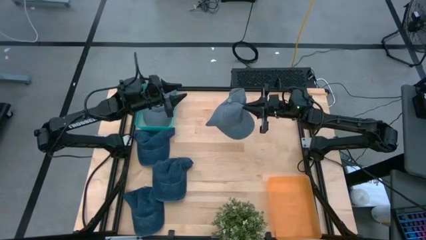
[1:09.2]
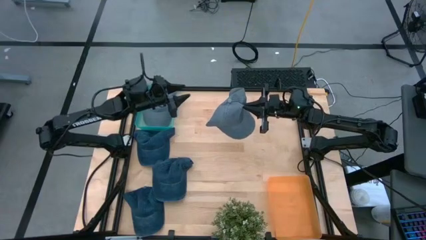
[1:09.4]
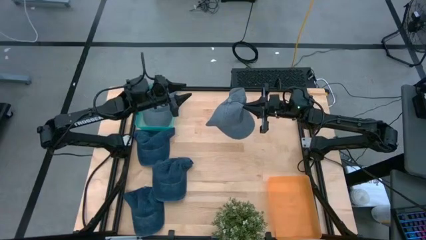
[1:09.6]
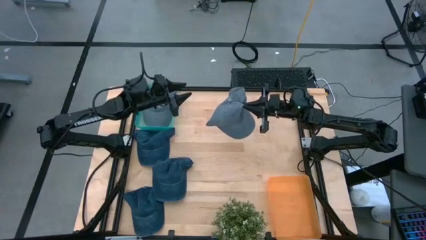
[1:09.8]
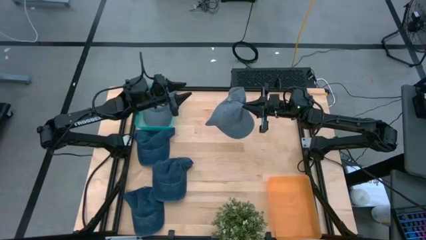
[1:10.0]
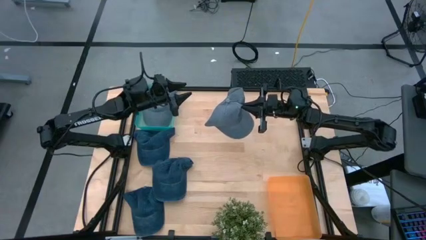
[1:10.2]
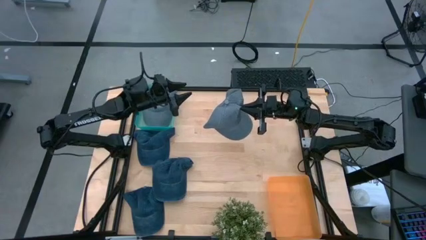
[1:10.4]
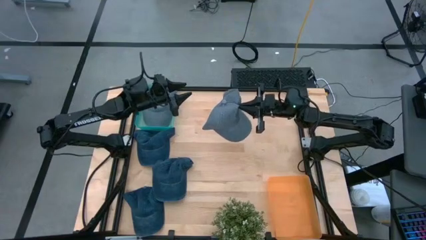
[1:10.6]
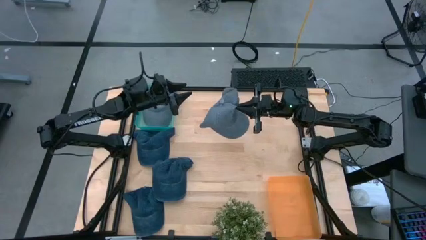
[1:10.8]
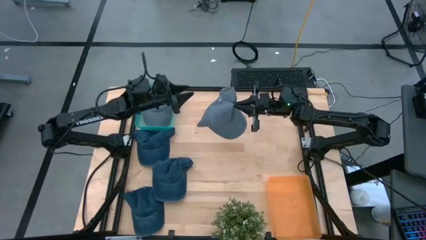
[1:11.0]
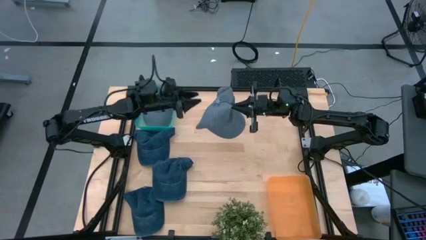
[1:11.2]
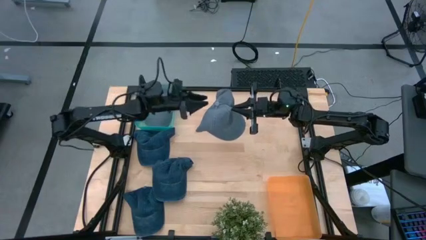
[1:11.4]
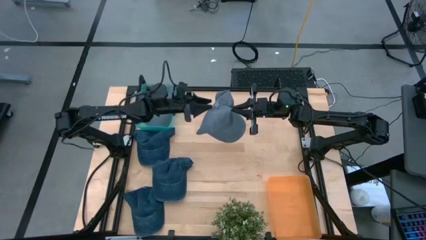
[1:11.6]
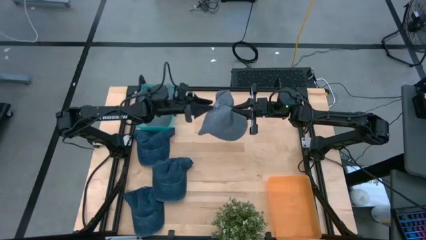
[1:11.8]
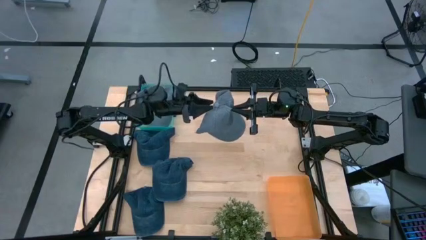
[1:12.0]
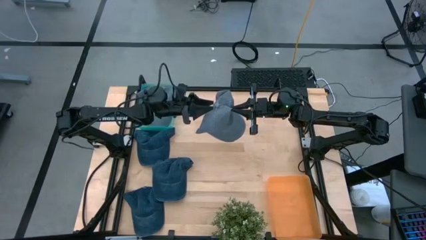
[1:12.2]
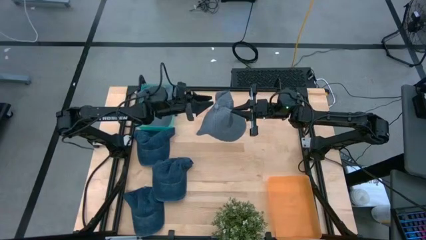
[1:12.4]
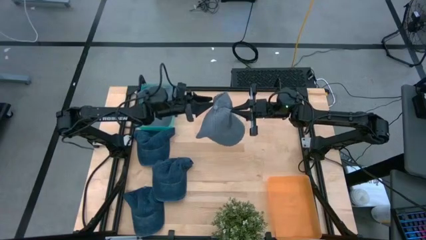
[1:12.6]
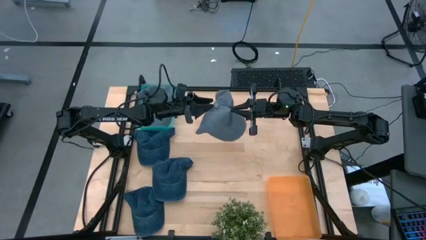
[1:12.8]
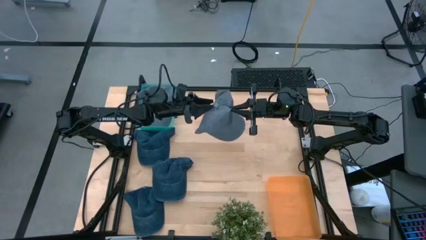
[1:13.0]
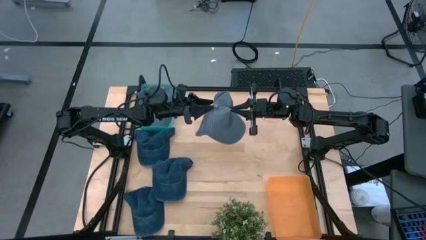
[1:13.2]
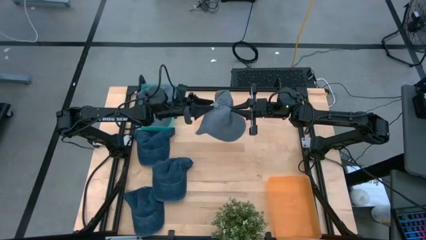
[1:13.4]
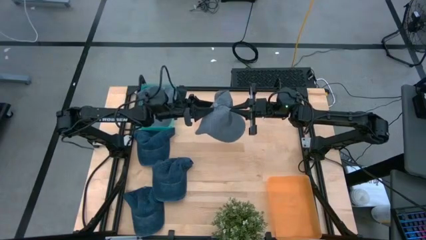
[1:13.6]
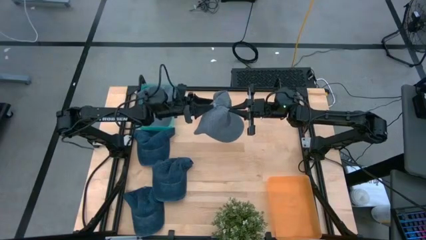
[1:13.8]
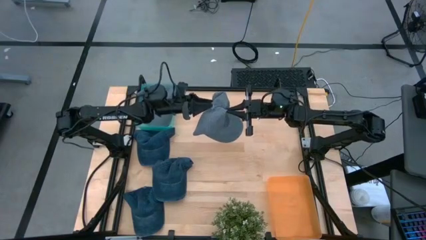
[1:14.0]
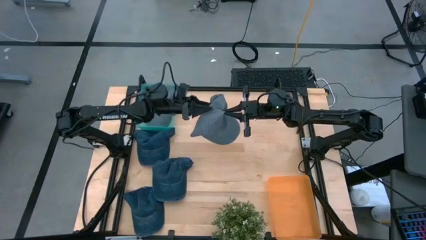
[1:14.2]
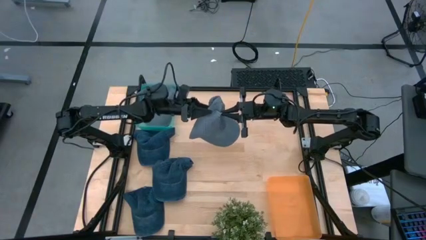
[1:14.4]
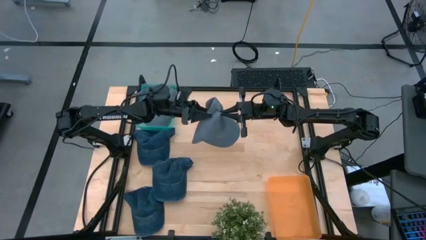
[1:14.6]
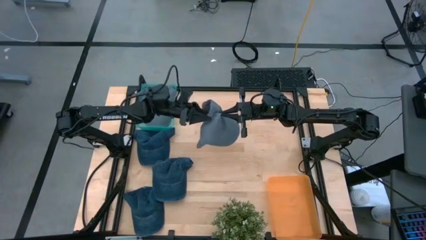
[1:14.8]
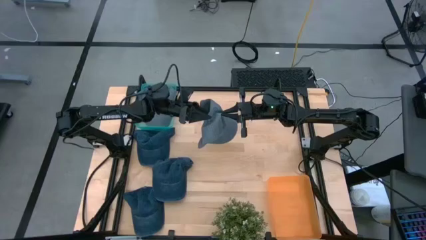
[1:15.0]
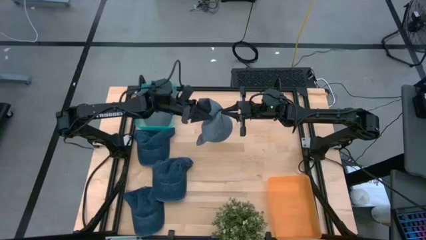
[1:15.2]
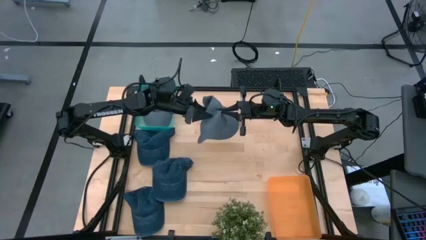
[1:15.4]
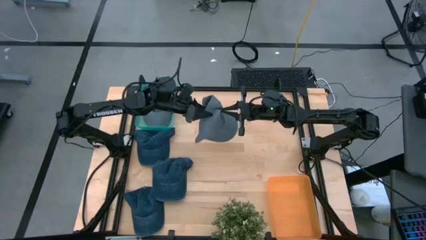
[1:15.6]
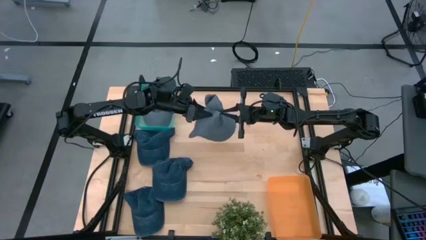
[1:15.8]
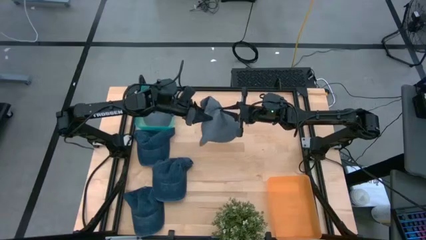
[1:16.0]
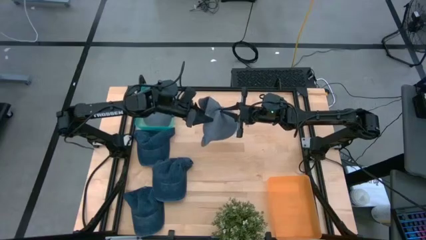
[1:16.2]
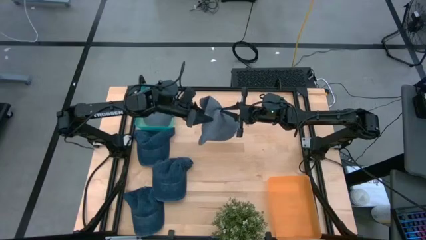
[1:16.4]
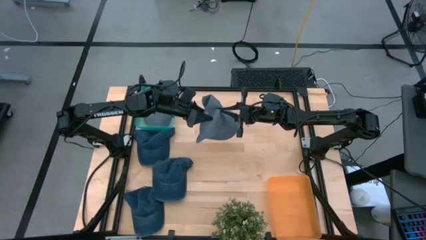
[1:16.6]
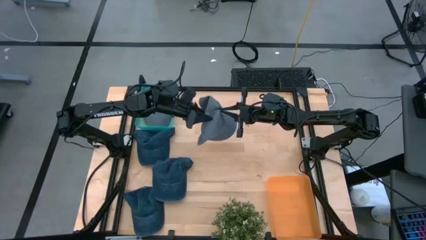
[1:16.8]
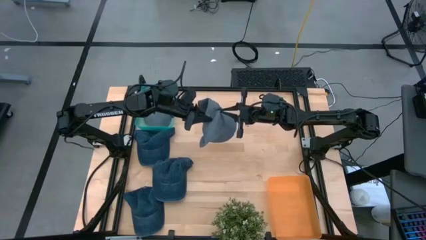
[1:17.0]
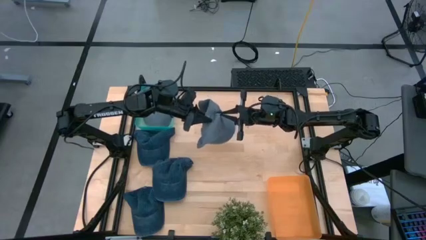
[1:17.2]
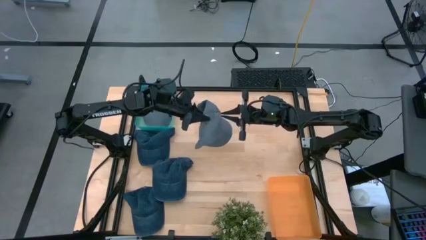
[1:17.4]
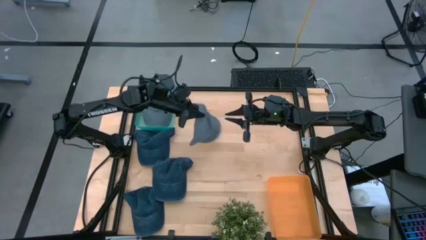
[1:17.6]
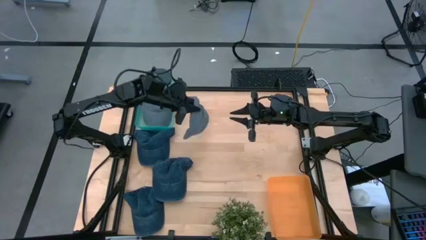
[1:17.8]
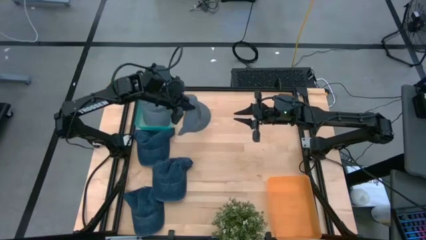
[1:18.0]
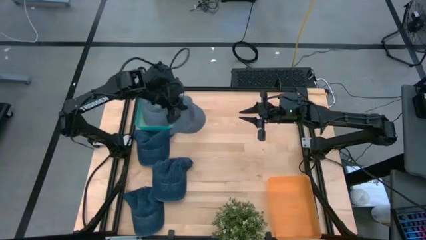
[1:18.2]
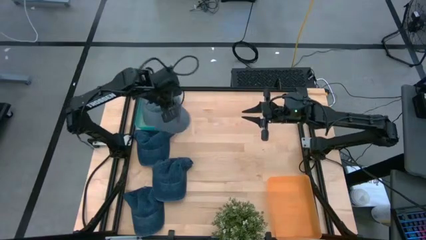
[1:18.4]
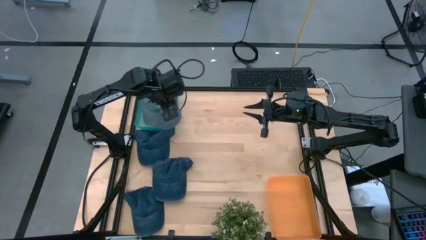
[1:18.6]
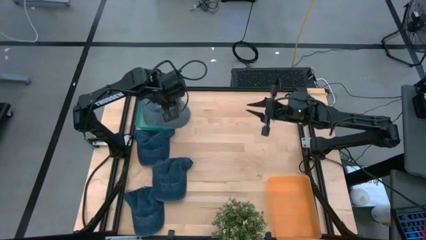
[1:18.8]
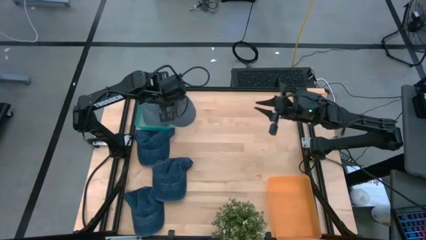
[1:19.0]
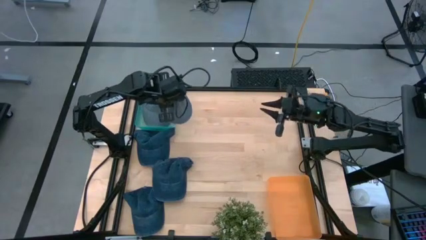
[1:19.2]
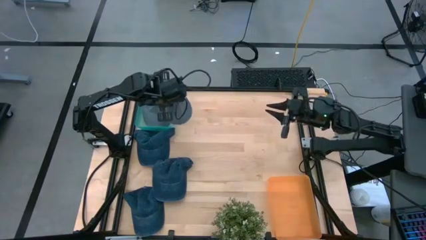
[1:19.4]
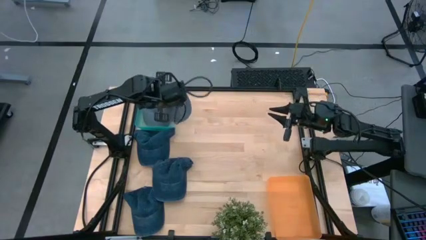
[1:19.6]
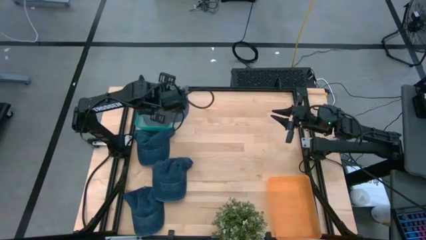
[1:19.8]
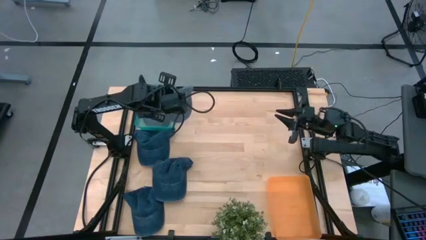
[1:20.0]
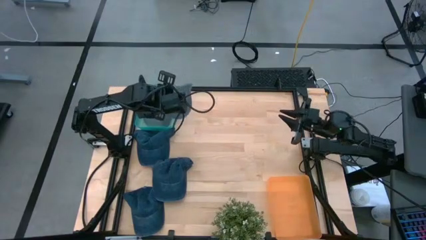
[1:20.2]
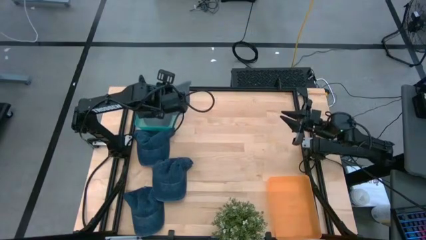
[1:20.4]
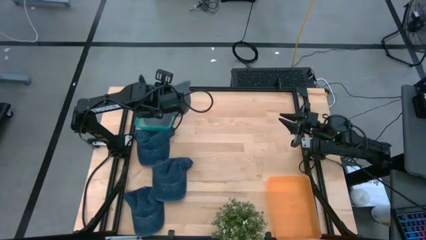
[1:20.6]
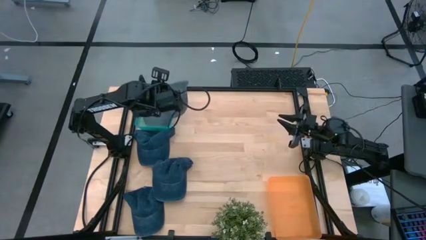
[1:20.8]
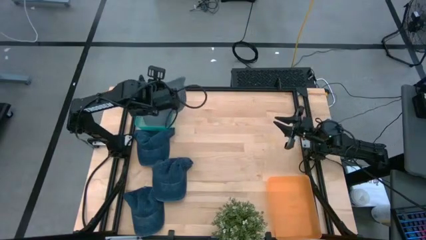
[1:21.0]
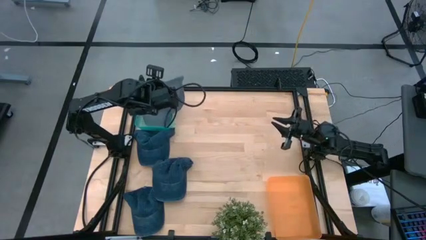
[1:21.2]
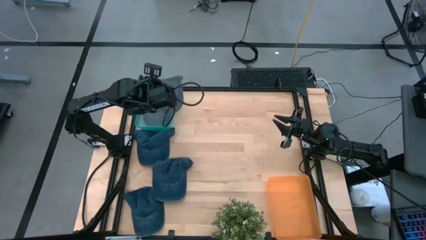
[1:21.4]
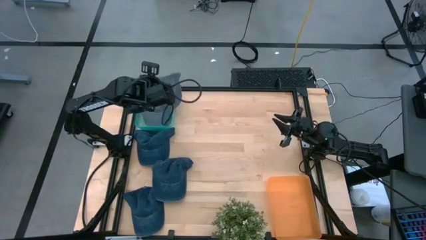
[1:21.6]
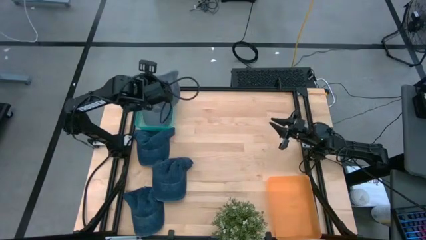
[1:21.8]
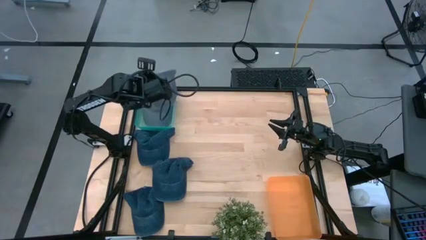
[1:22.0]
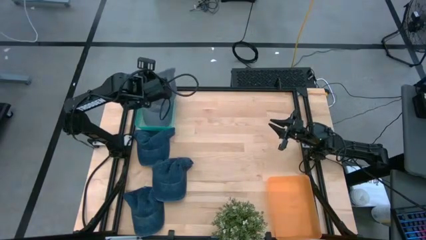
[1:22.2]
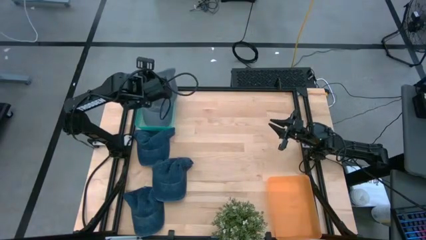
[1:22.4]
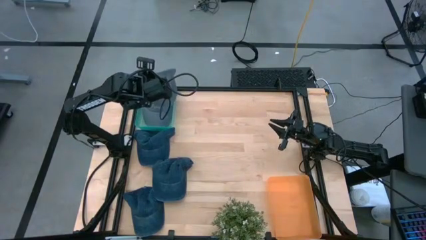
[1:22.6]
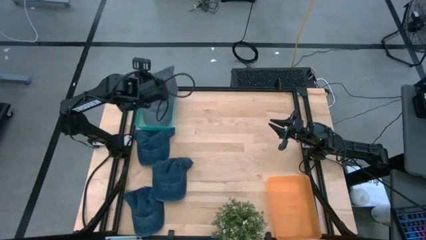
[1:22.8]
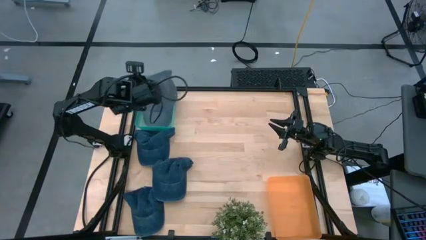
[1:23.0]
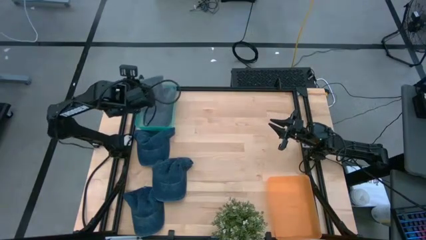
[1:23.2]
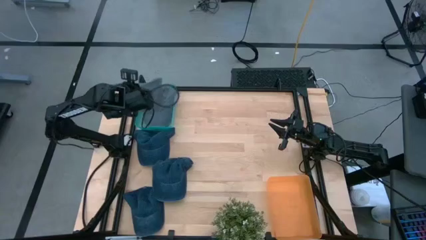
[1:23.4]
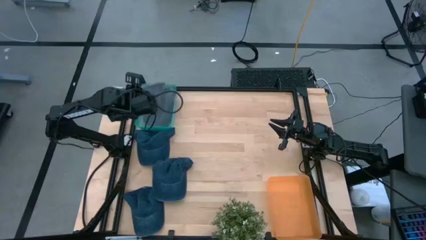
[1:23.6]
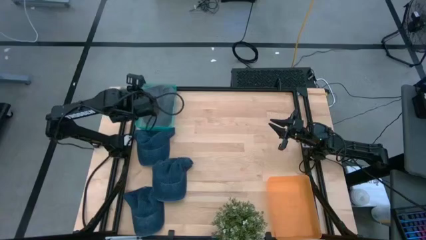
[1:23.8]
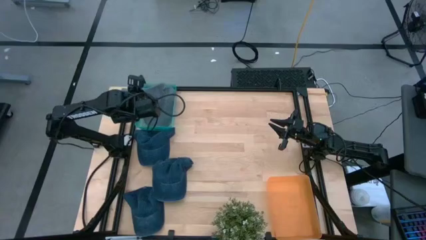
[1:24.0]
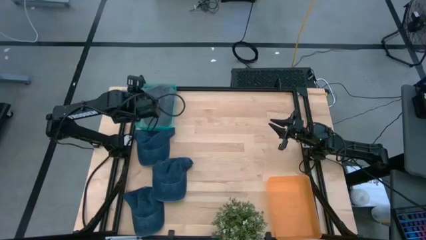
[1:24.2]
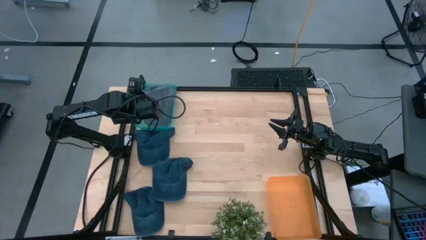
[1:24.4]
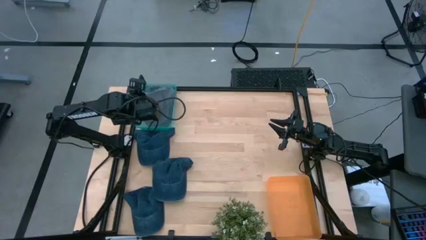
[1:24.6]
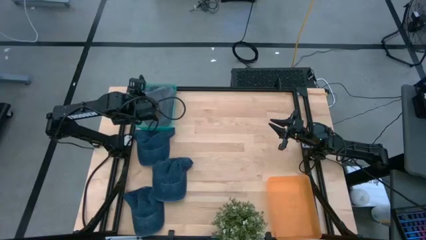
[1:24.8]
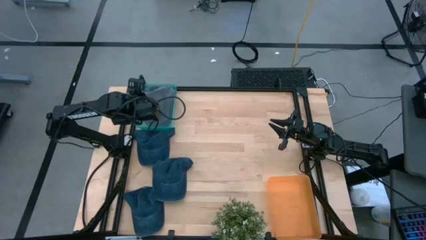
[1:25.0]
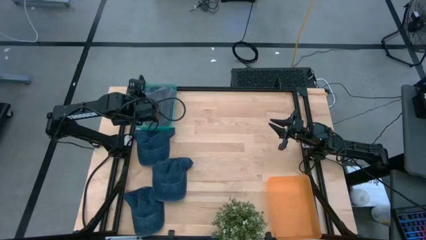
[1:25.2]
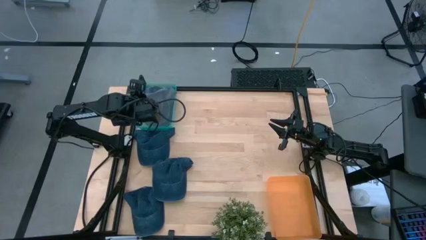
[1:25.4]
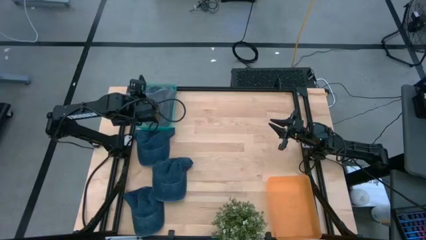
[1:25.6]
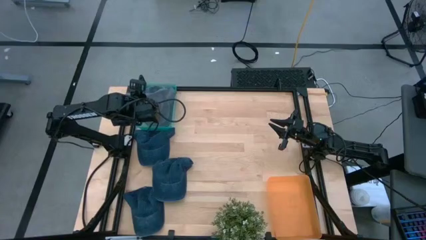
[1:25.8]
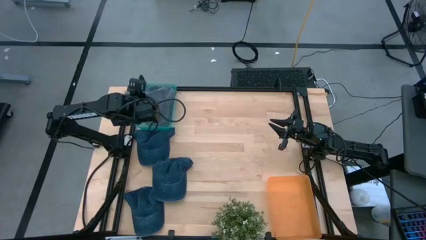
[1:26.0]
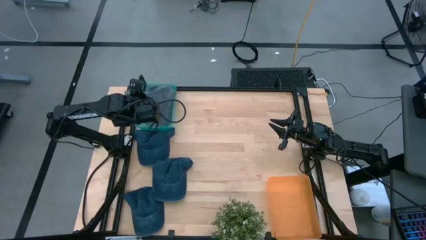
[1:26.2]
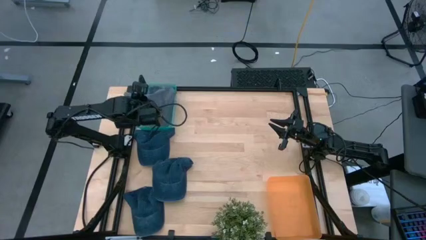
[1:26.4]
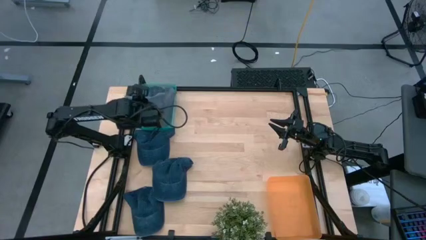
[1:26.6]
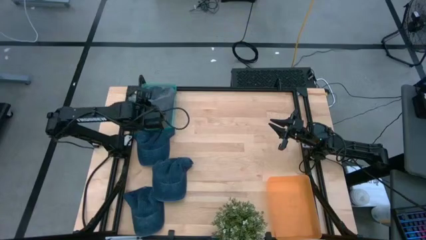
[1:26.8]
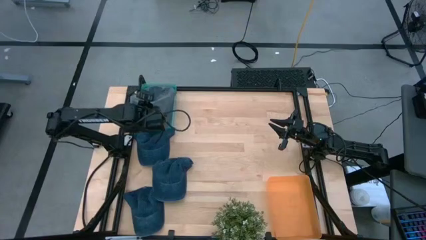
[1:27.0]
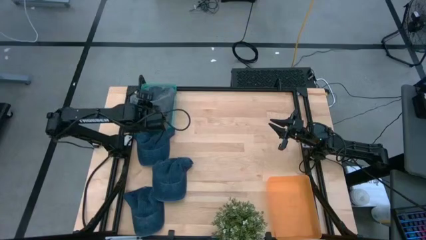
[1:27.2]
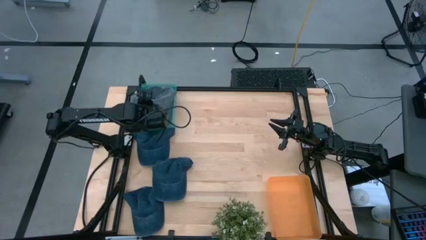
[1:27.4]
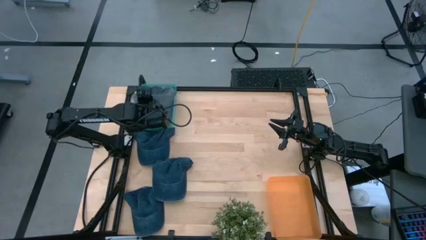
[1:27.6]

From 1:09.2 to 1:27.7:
Task: Pick & Place hat
Put the gray cap into the green bin
